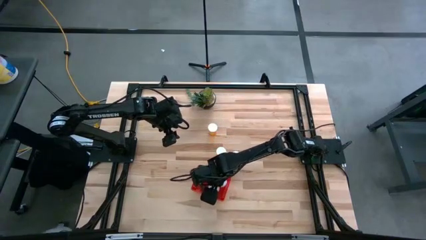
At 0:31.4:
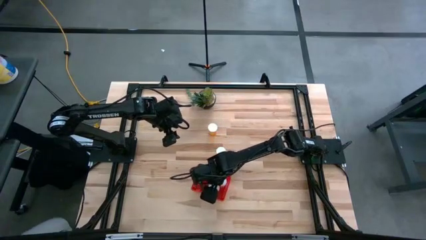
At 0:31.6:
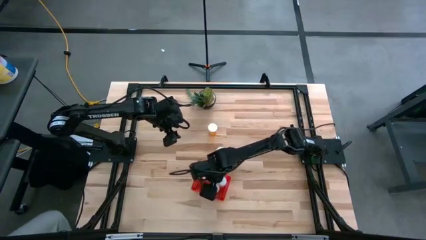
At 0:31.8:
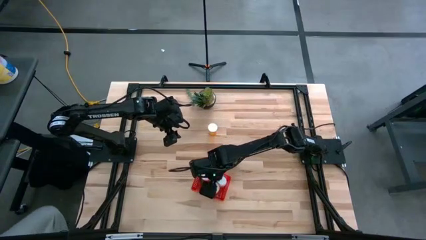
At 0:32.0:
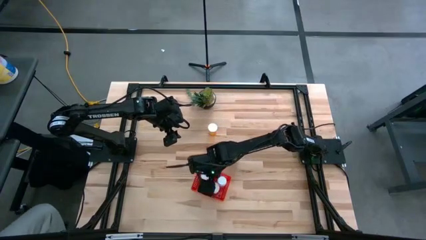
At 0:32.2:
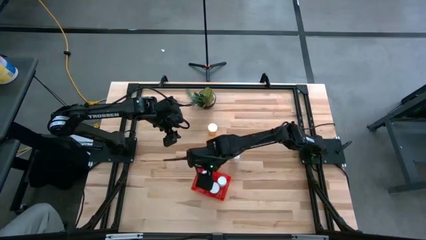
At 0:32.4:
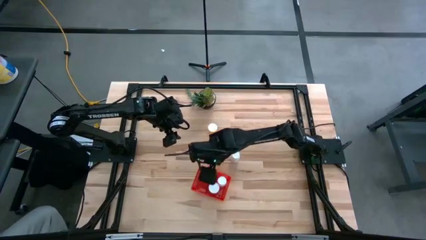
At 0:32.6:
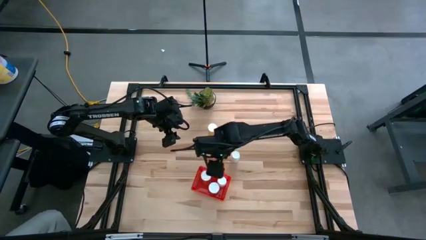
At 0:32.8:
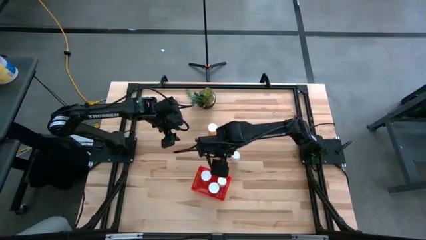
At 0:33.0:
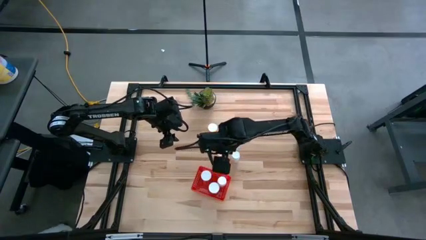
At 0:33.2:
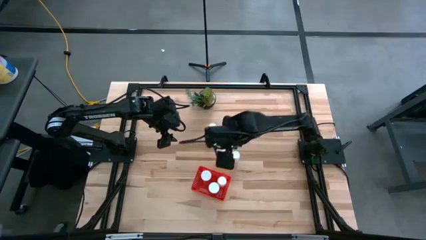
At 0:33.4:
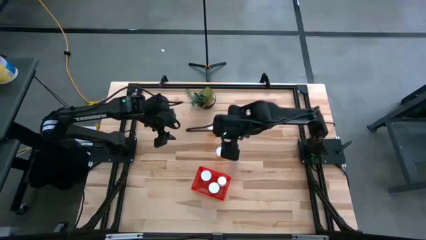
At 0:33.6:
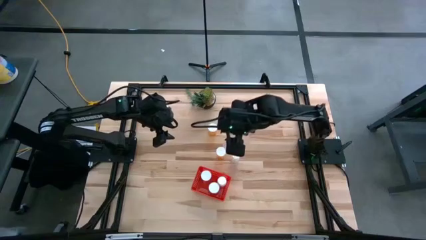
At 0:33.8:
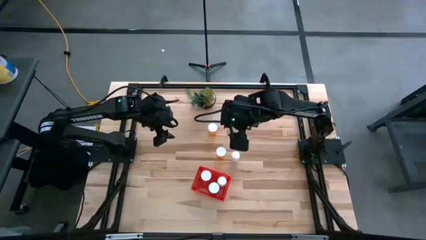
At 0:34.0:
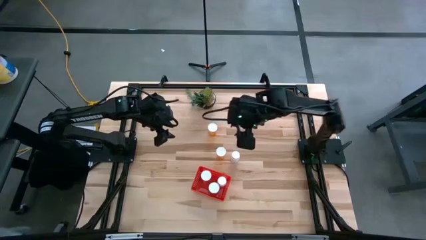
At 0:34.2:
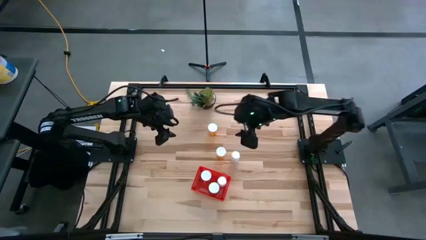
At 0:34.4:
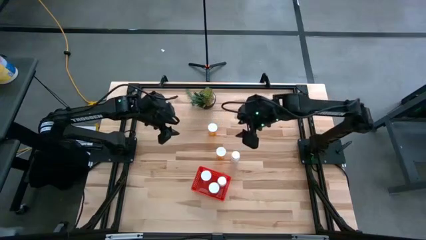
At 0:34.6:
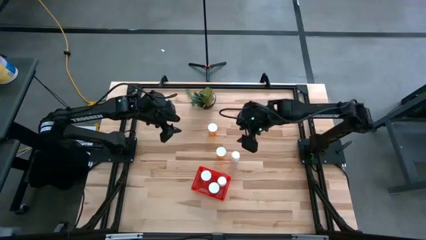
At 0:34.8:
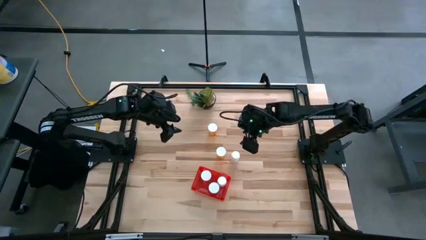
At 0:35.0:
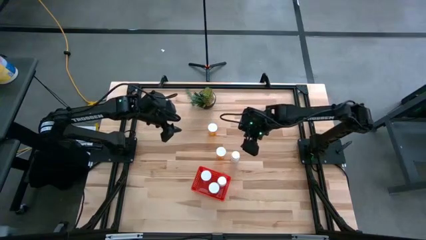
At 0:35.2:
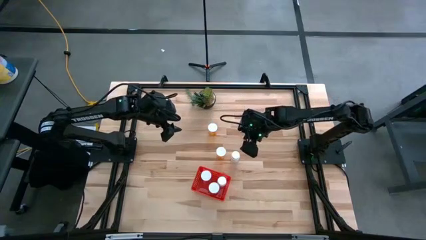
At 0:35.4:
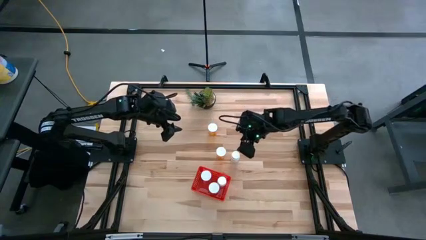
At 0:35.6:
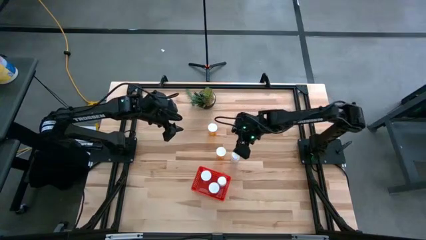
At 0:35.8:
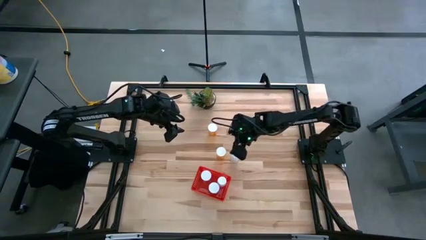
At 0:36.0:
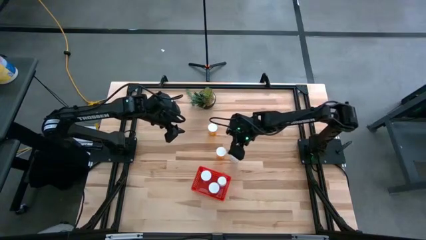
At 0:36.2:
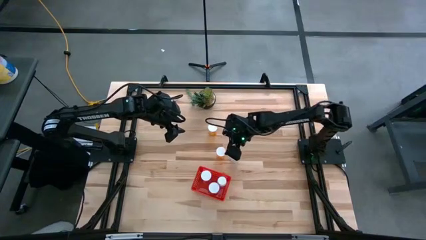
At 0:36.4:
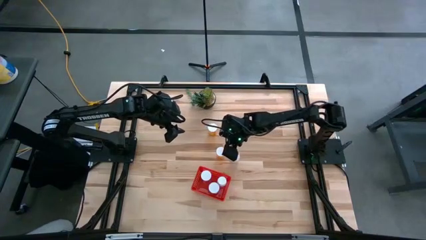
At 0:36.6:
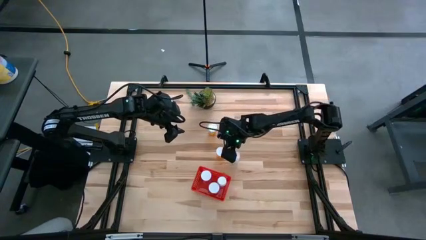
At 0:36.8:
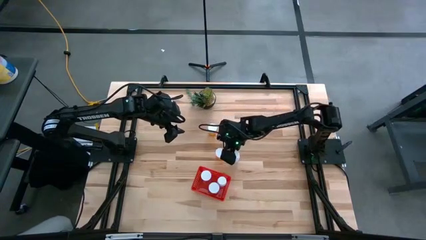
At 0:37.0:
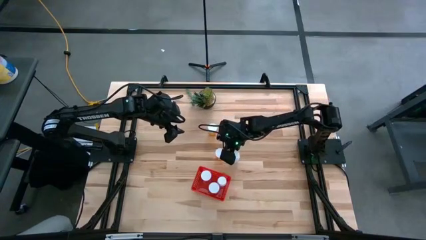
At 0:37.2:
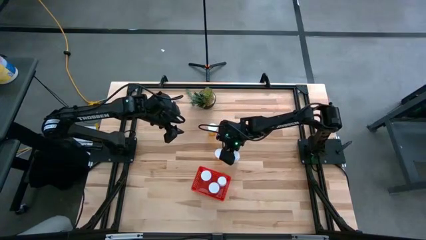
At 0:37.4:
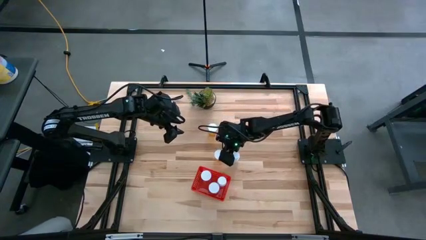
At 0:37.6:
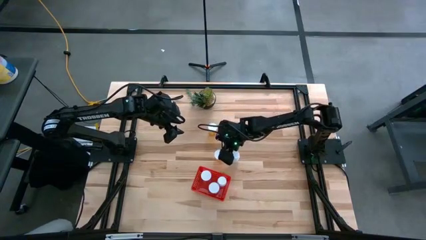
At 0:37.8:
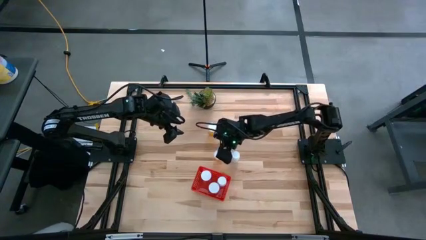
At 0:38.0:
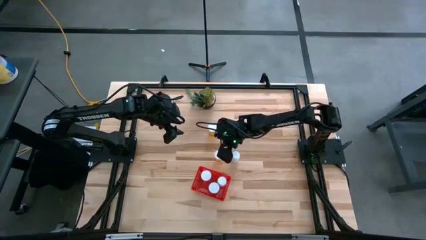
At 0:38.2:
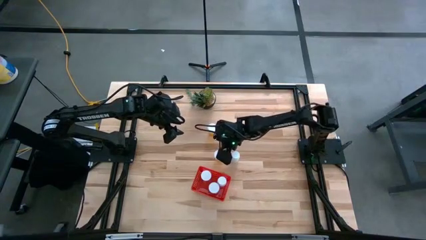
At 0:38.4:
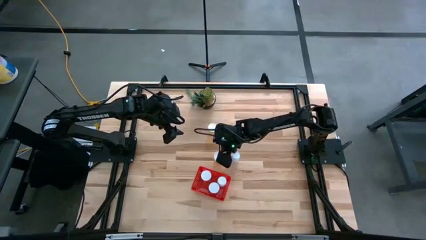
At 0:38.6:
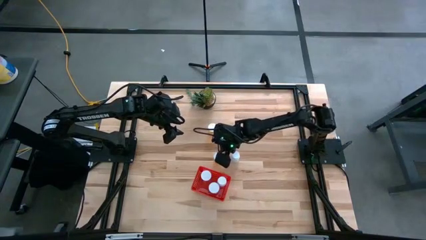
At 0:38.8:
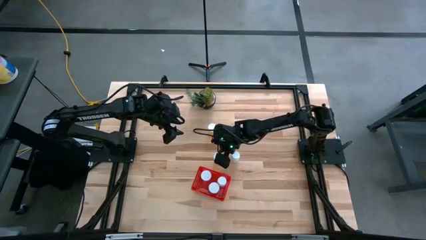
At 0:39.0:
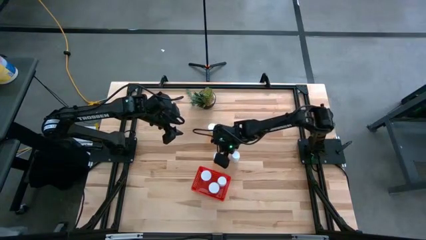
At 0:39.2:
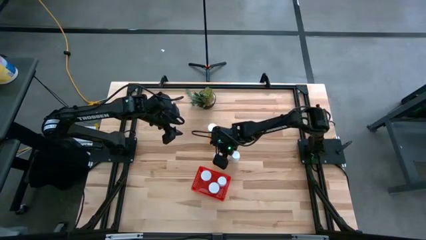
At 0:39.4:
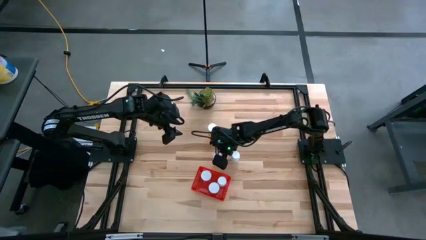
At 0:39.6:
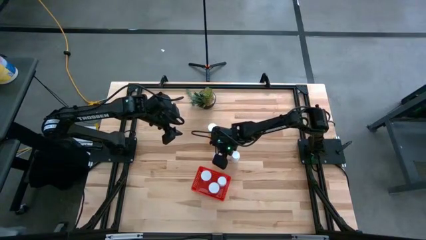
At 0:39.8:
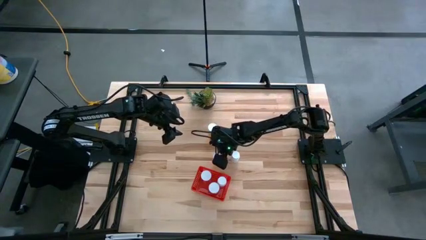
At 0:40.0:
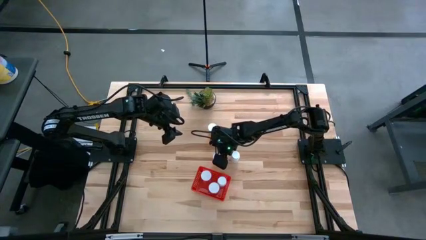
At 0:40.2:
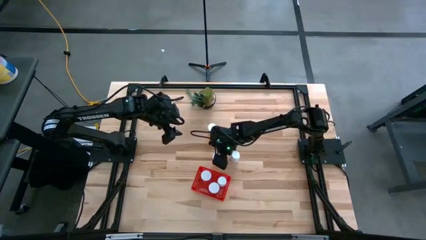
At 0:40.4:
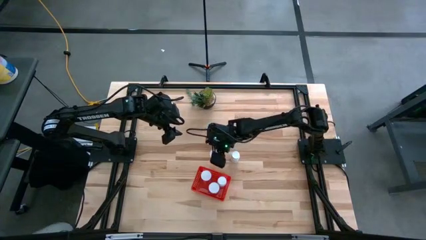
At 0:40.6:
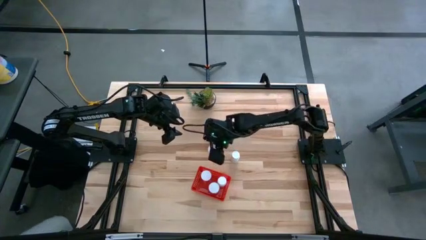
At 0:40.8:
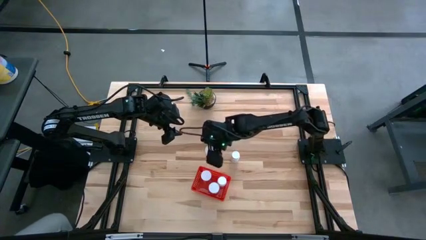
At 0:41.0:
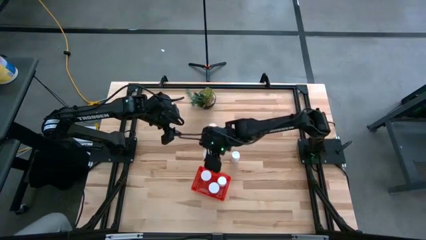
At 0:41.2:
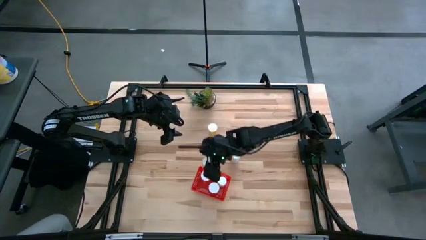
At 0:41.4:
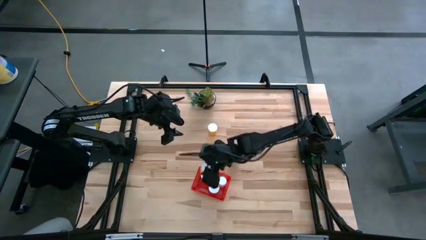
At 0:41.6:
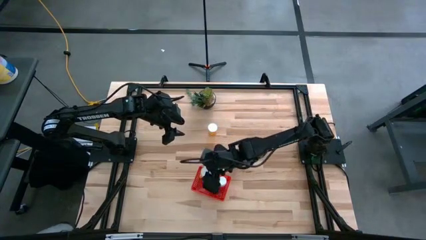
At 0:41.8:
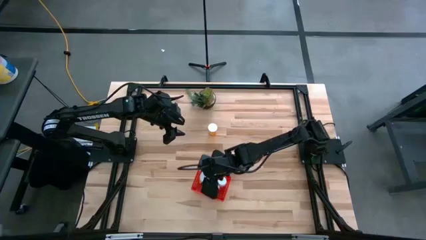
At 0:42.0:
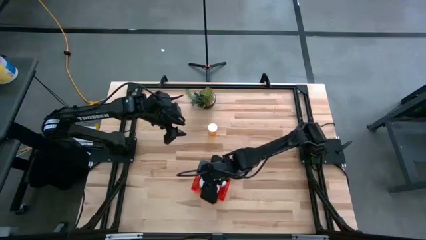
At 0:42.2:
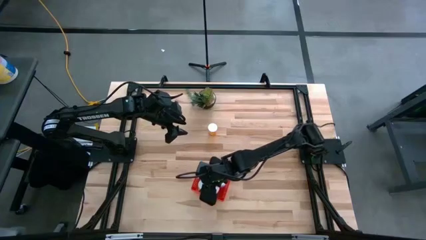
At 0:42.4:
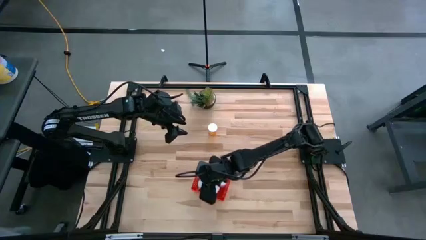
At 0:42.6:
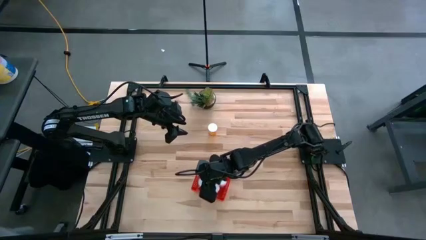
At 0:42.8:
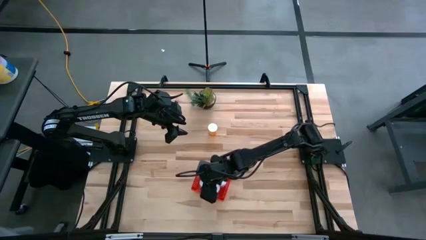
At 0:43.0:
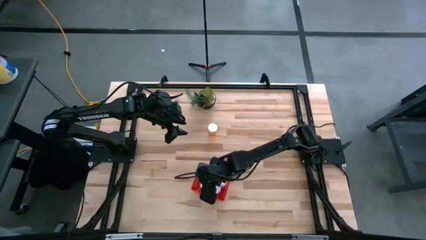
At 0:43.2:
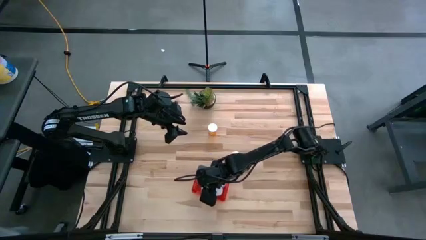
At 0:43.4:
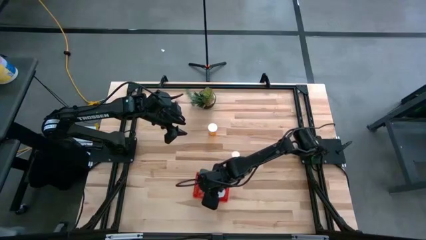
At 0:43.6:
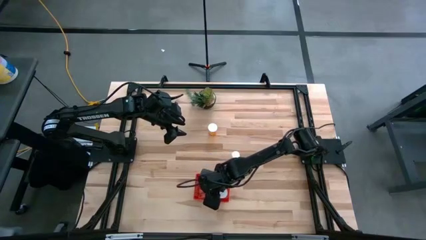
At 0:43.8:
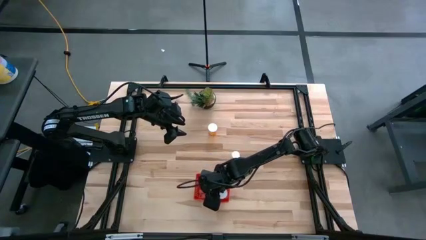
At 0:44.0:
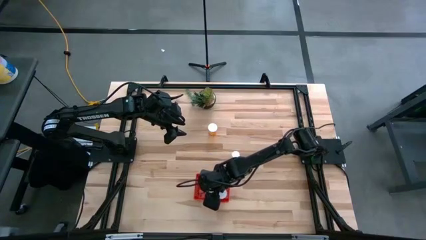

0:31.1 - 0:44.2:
Task: Pick and place pill bottles into a basket
Put the bottom orange pill bottle into the basket

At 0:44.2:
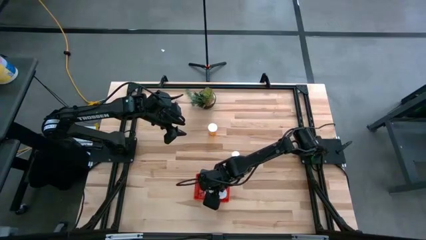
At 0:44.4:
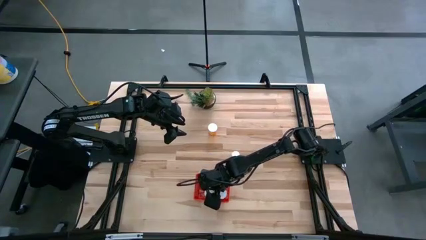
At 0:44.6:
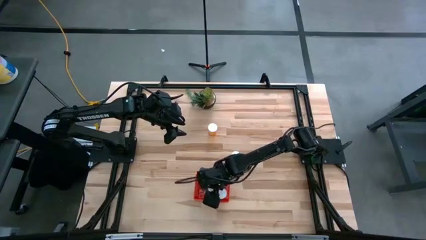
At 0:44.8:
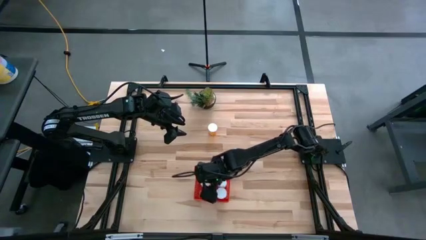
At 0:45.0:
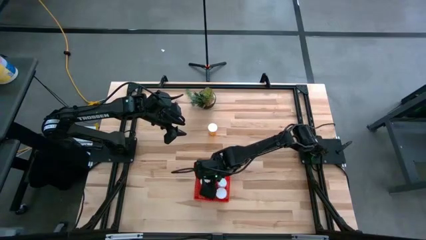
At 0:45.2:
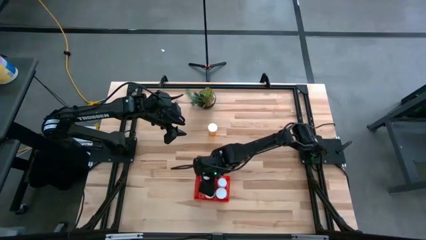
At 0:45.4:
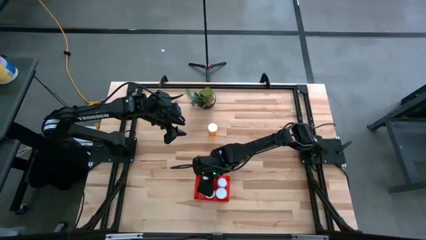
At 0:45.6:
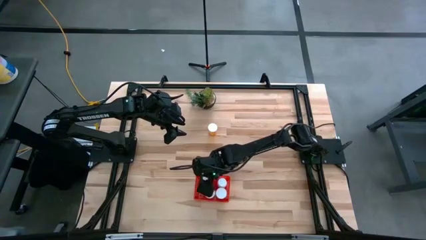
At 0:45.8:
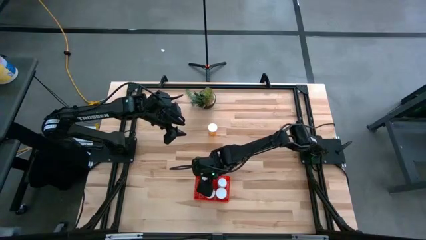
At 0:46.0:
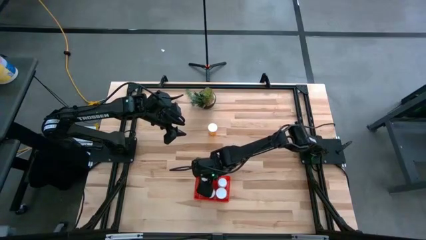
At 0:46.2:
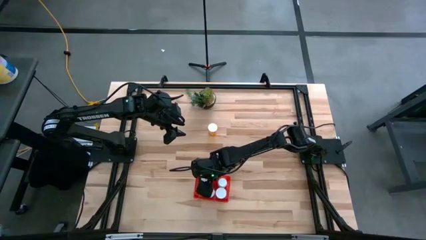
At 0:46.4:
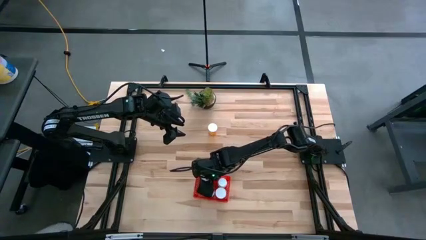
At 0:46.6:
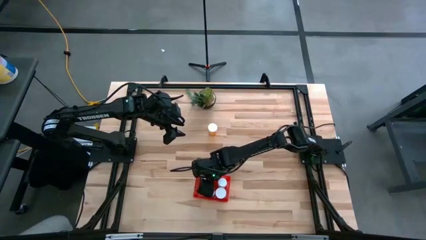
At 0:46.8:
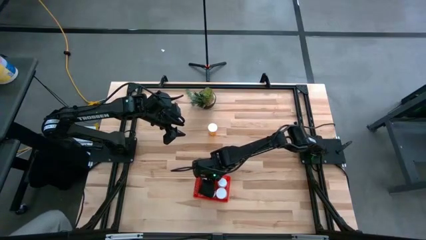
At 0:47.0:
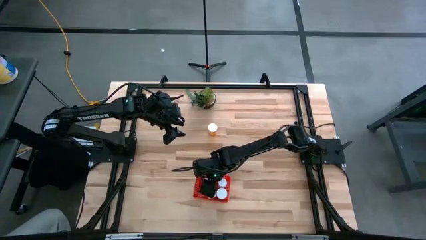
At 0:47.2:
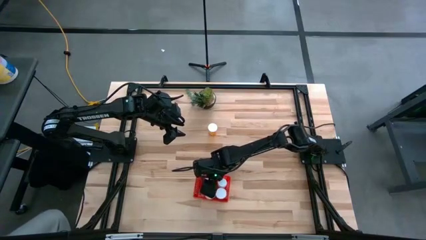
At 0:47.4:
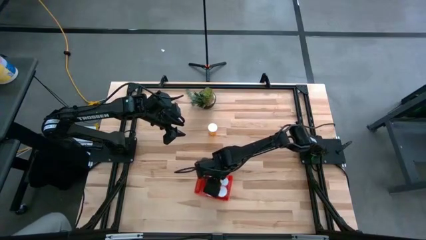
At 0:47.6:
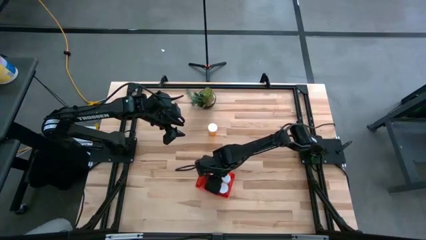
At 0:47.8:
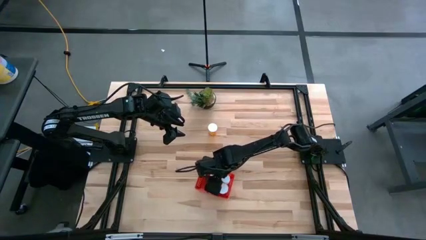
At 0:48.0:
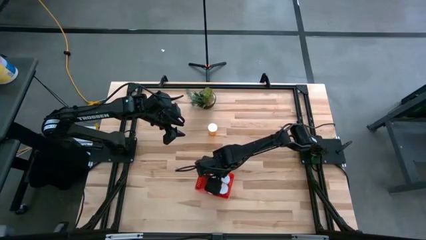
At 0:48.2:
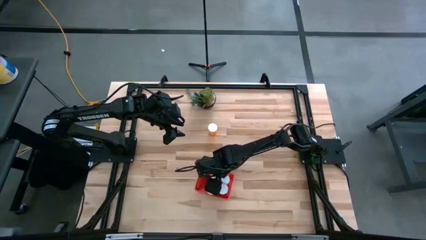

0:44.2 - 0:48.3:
Adjust the top orange pill bottle in the basket
